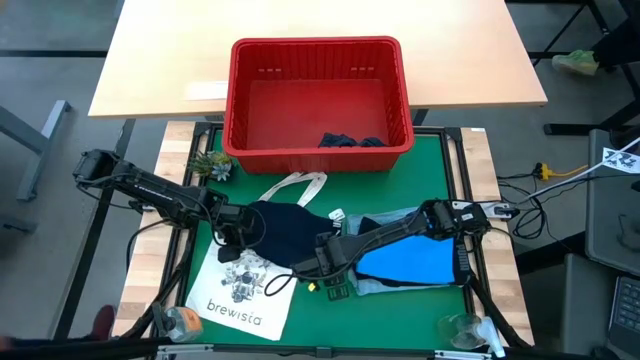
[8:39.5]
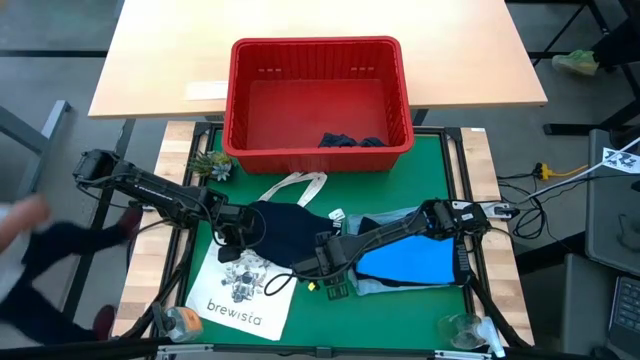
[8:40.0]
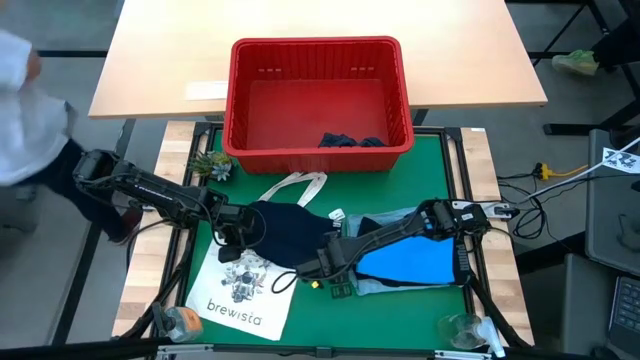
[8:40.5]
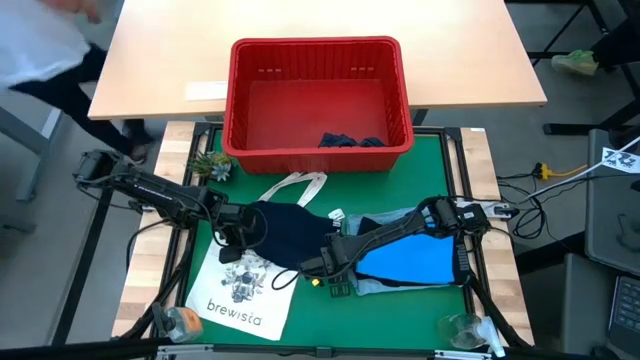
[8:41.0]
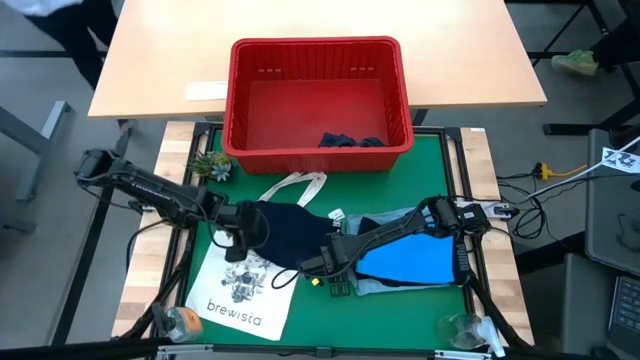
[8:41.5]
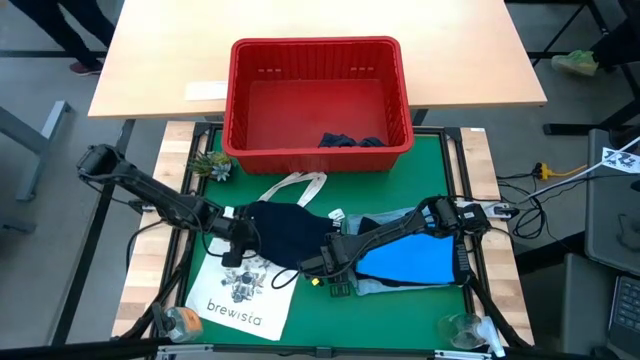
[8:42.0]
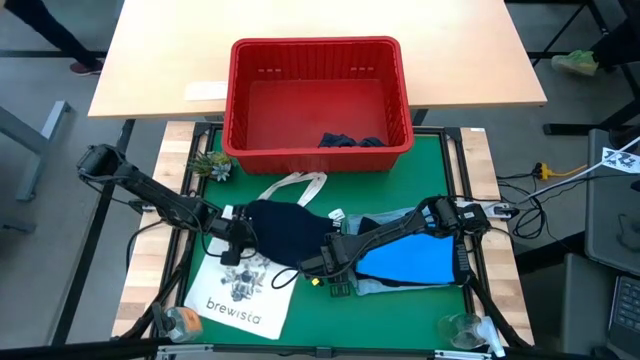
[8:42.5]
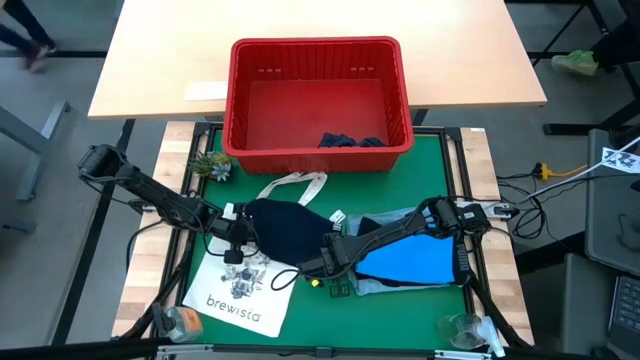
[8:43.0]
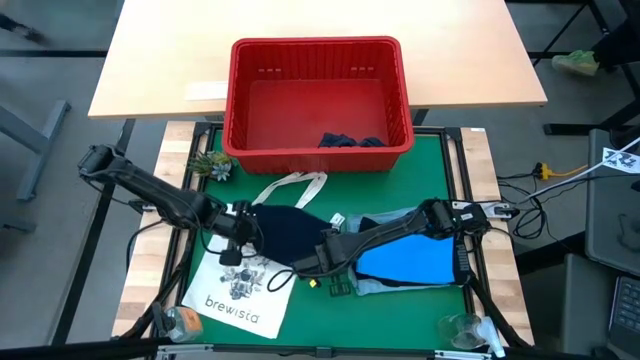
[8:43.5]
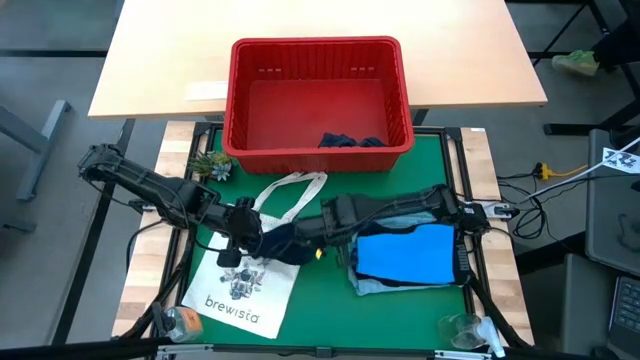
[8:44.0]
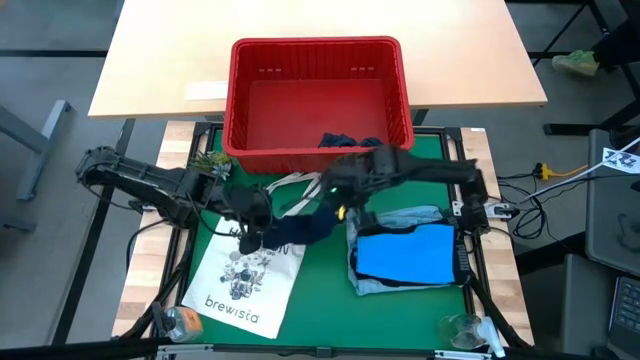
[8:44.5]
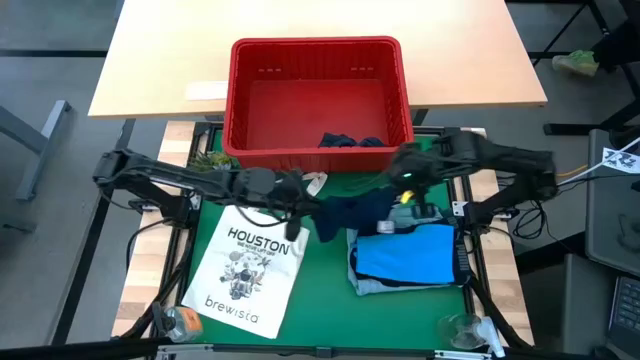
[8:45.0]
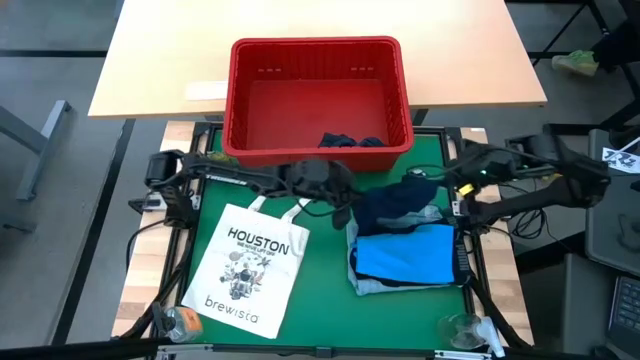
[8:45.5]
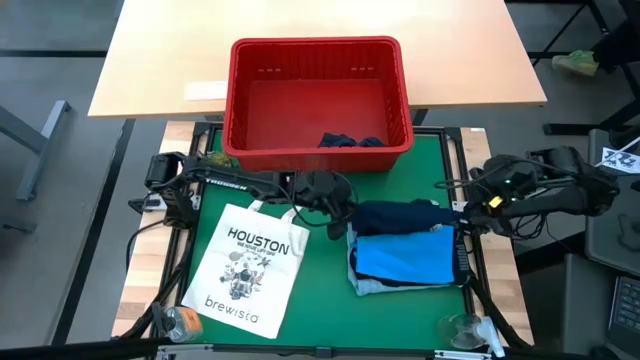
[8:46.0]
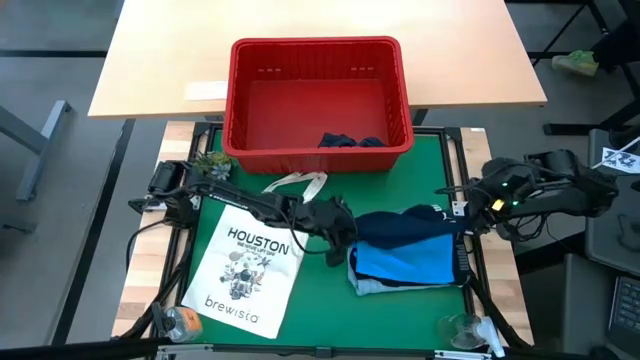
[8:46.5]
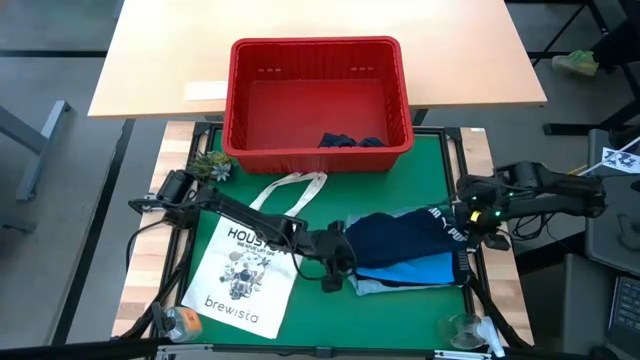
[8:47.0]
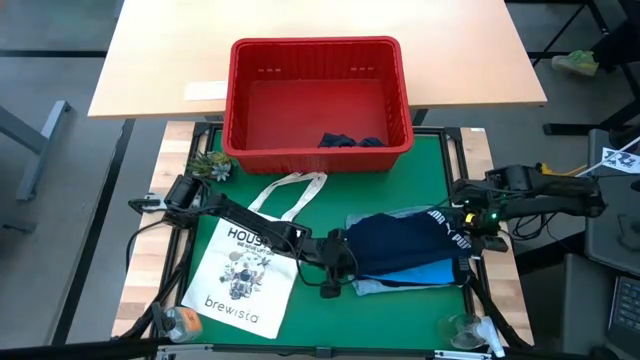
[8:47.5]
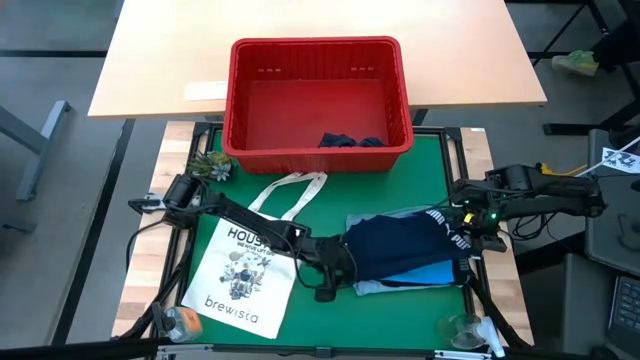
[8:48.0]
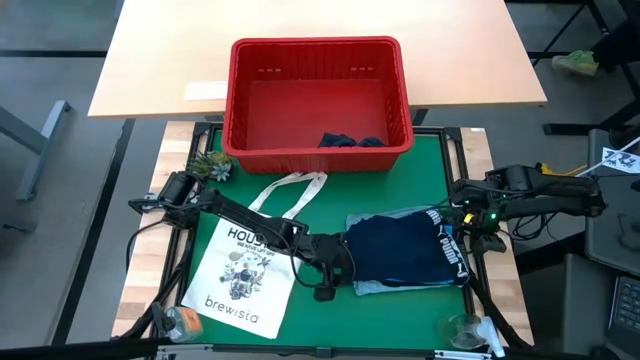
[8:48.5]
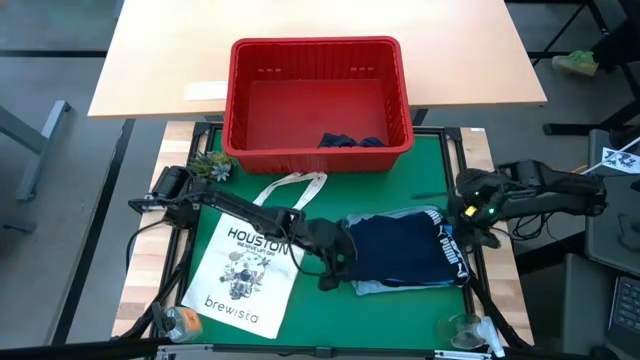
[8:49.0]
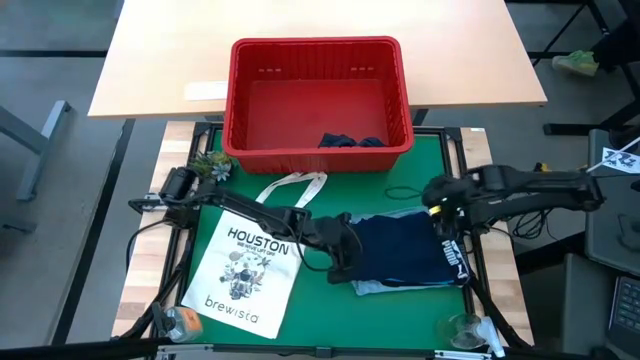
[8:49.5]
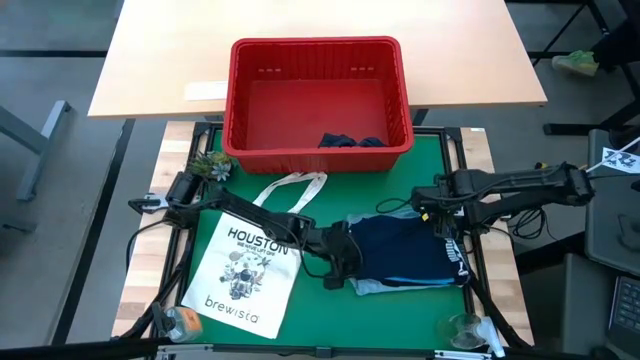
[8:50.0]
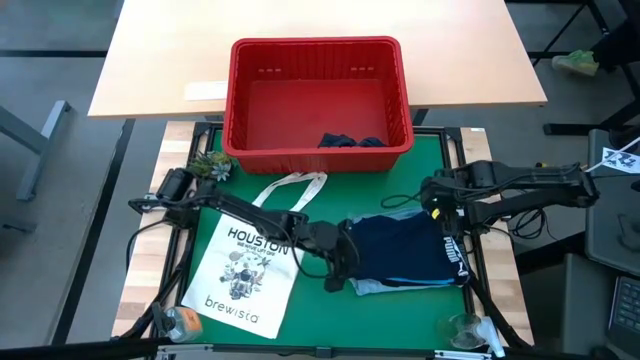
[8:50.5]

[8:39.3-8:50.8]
Task: Fold Laundry from Bin
Stack the dark blue boxer on top of the blue short

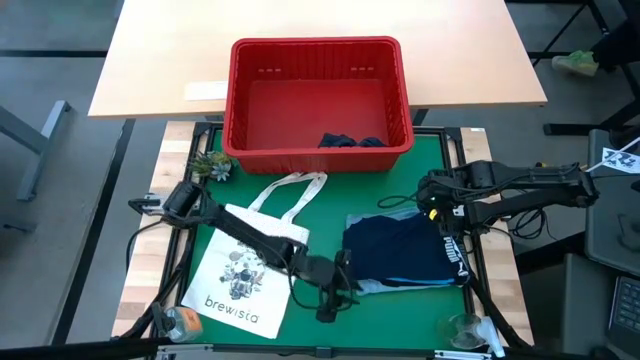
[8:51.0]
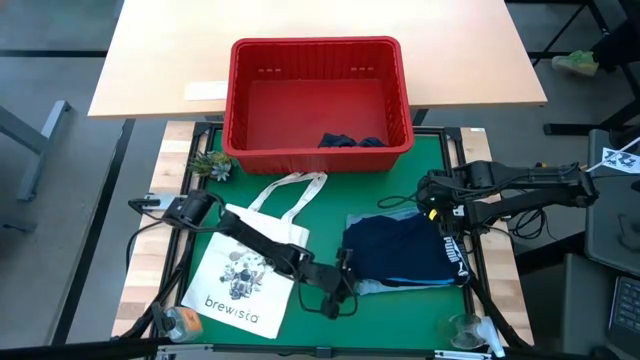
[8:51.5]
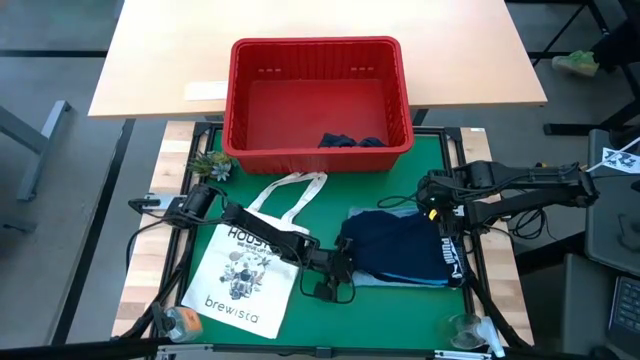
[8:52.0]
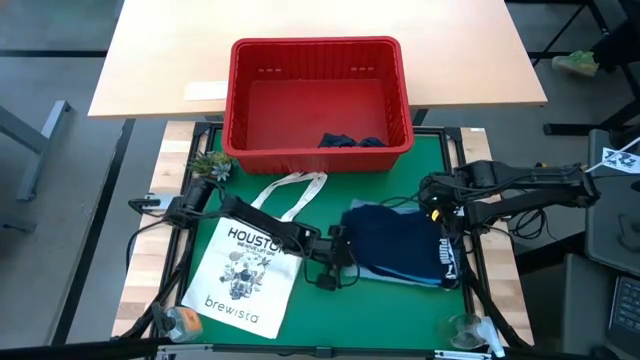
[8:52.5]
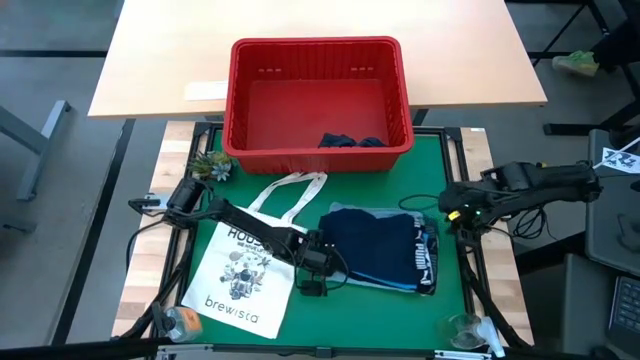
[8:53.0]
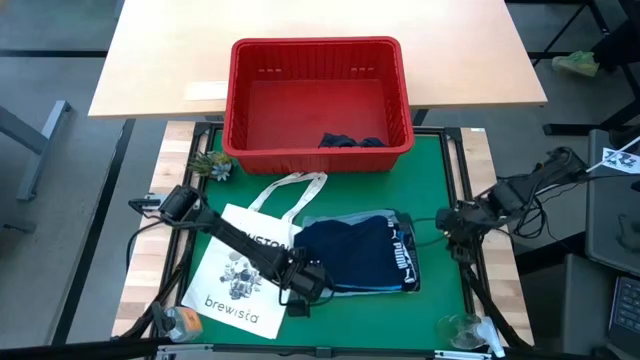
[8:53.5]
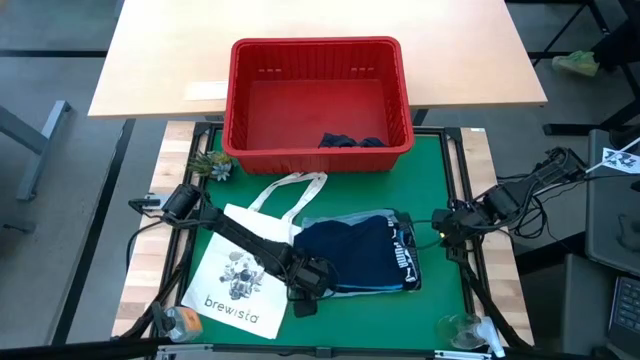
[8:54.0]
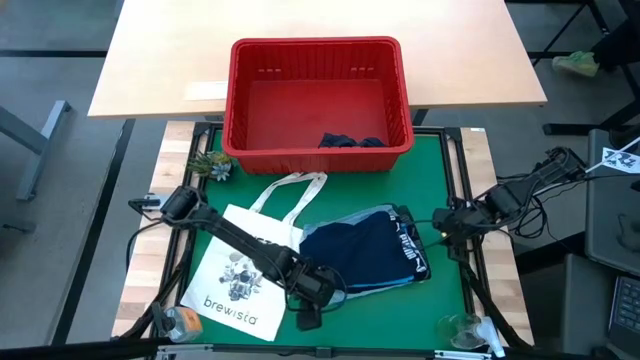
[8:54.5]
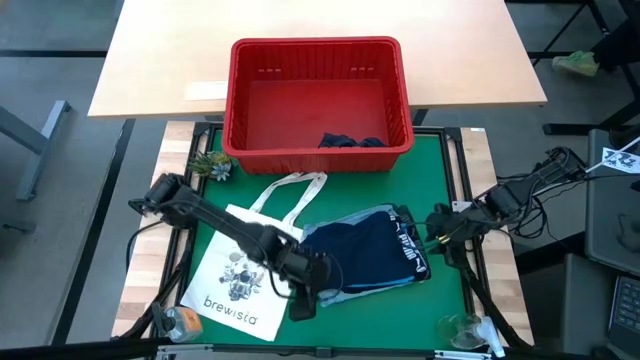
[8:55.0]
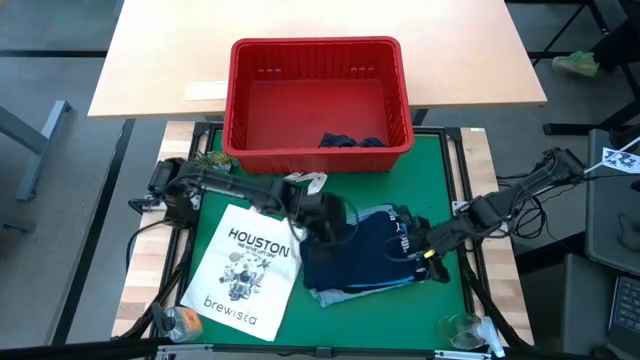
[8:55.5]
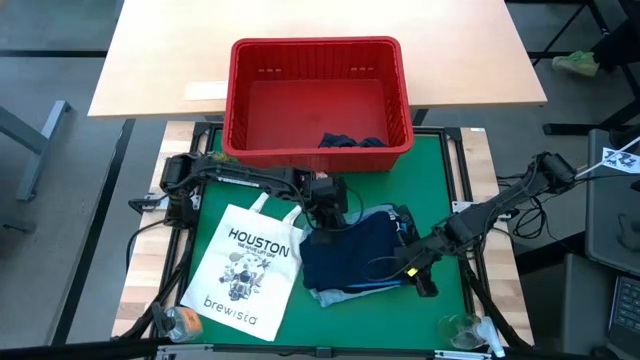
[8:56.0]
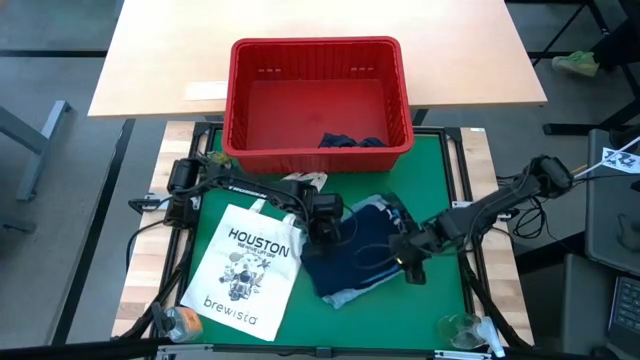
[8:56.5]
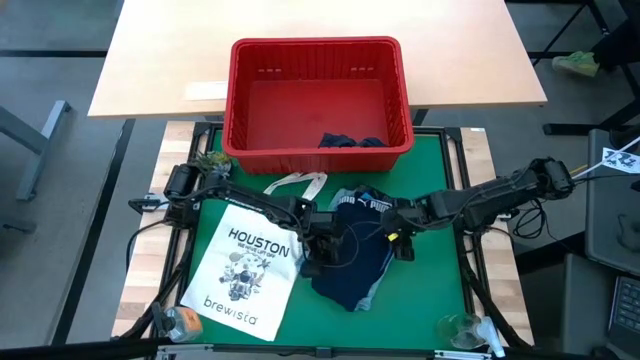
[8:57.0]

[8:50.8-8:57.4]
Adjust stacked cloths to the center of the table

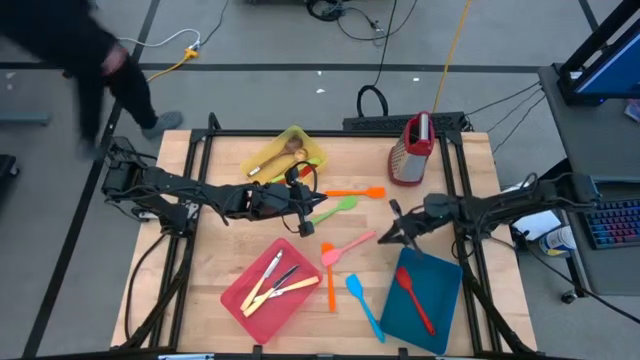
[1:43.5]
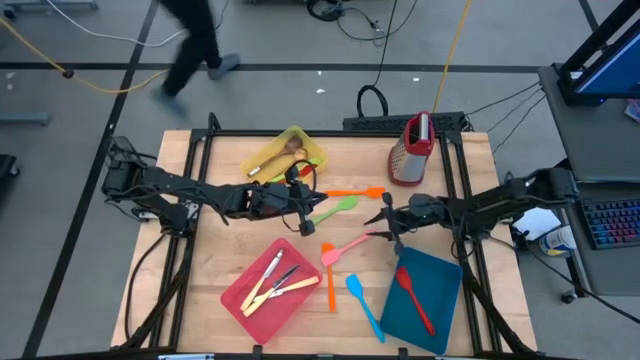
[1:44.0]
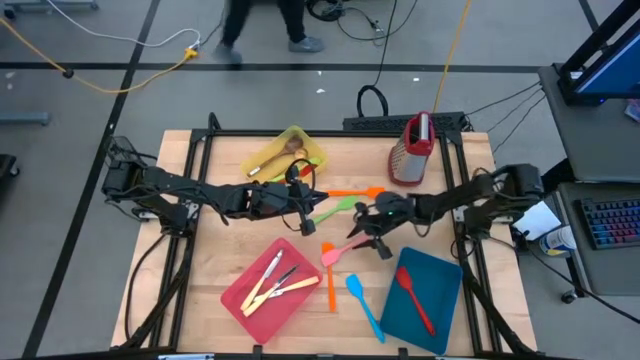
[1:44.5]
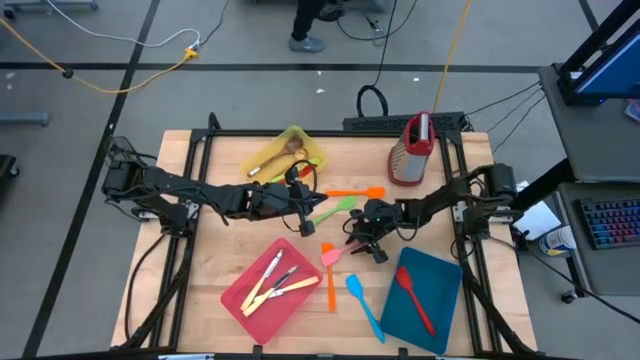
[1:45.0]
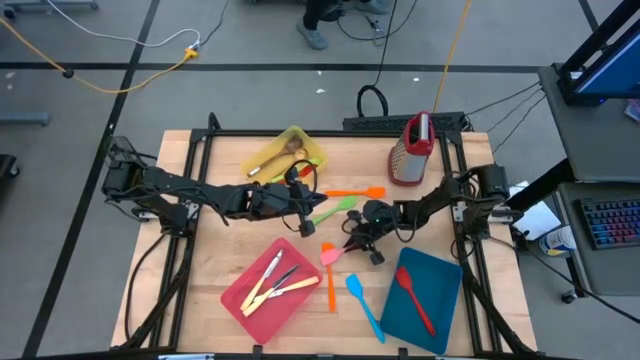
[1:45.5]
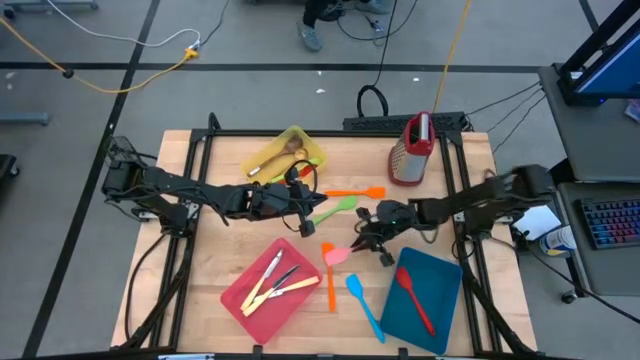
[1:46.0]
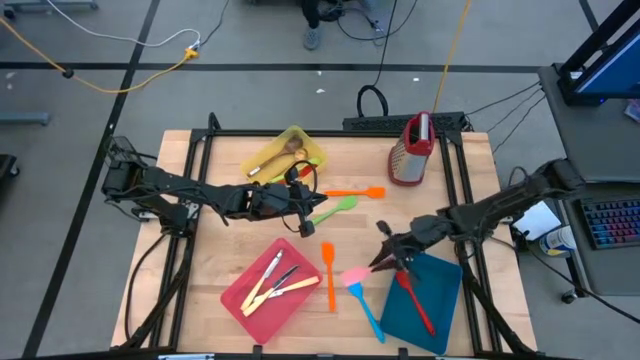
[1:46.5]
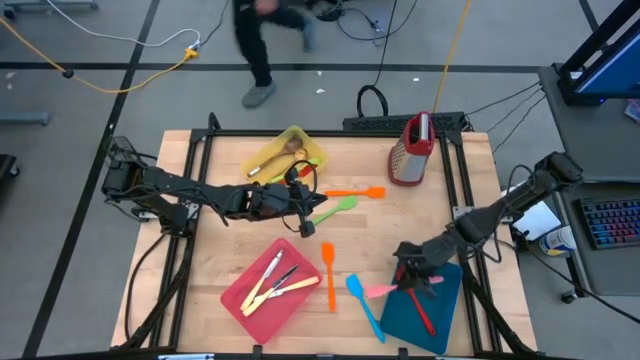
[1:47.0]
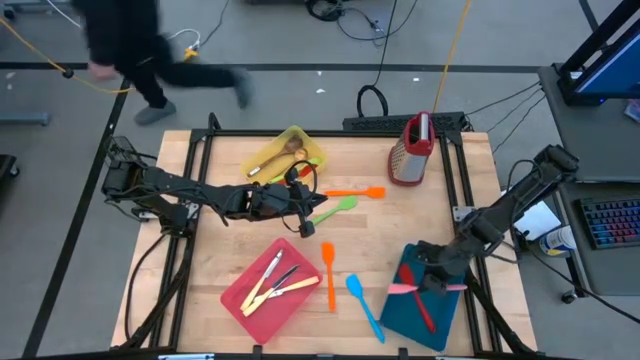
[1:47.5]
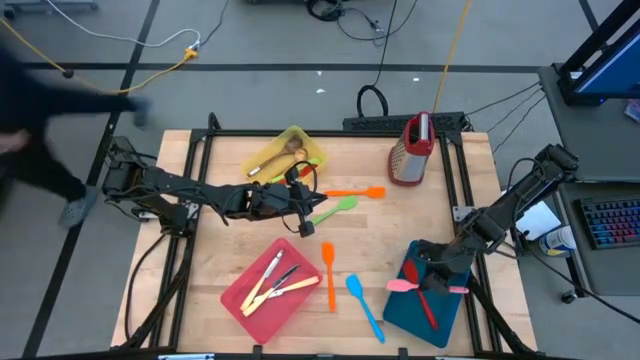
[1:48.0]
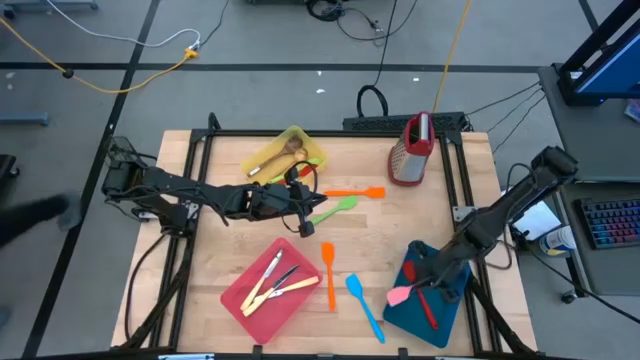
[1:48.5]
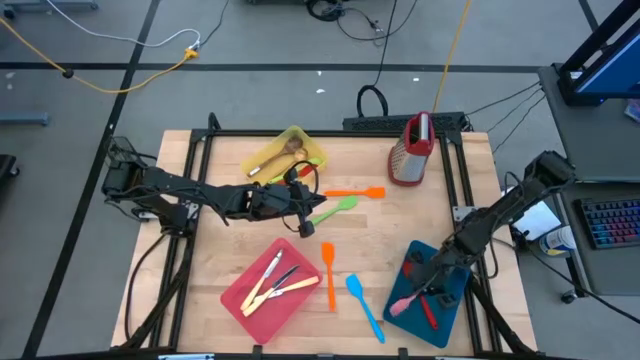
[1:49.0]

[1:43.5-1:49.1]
Task: Pick & Place Kitchen Items
Put the pink spatula into the blue bin
